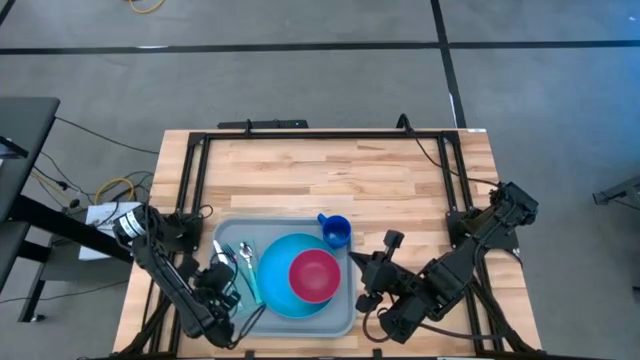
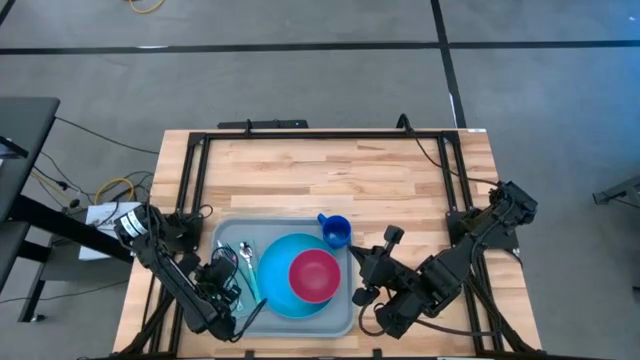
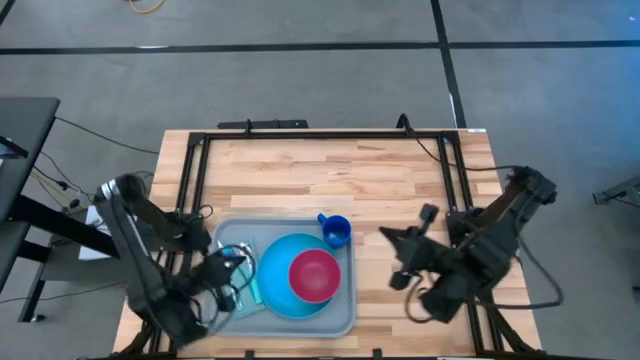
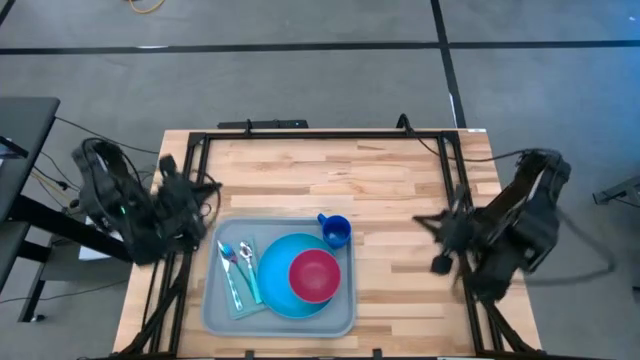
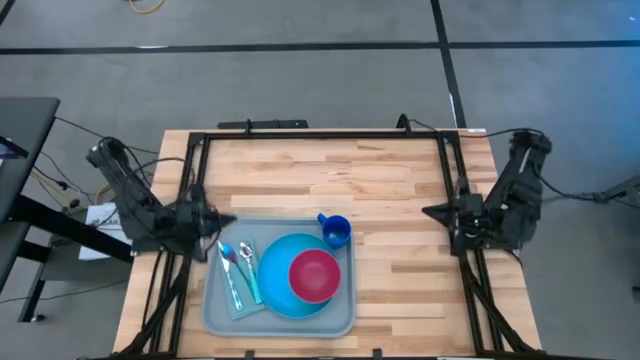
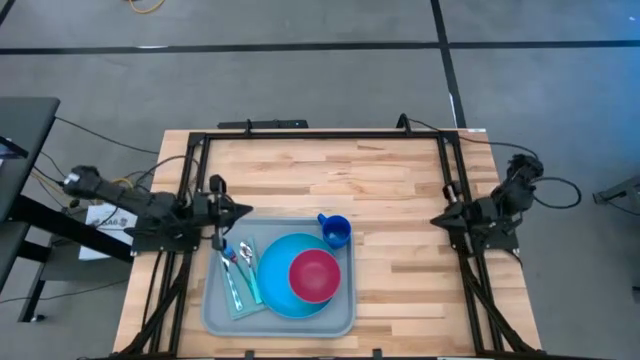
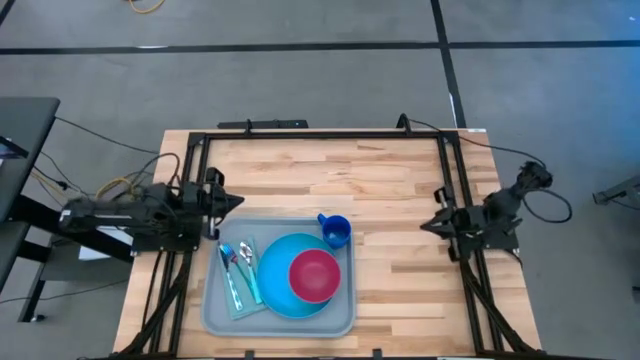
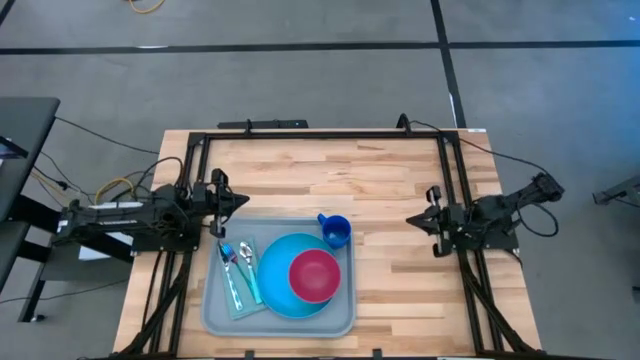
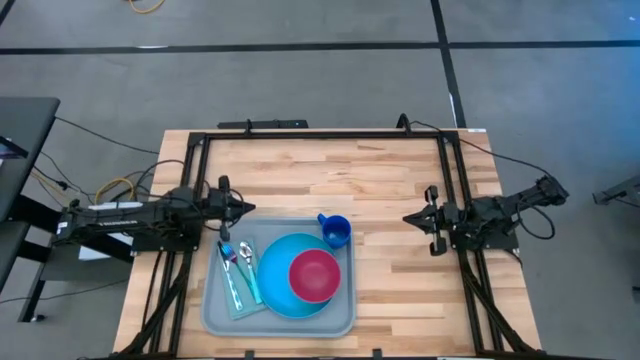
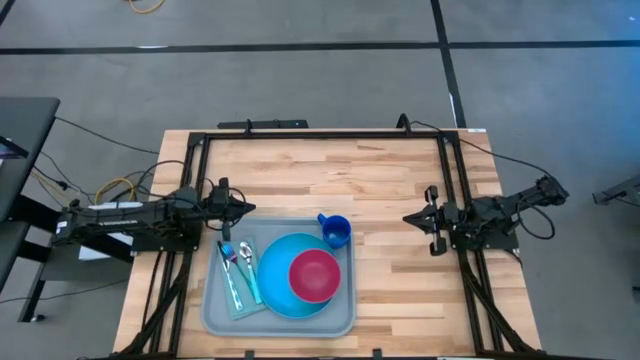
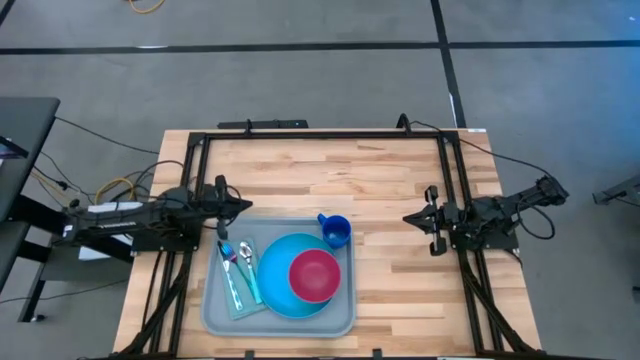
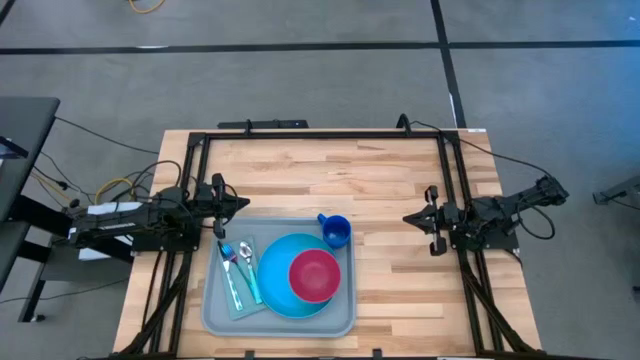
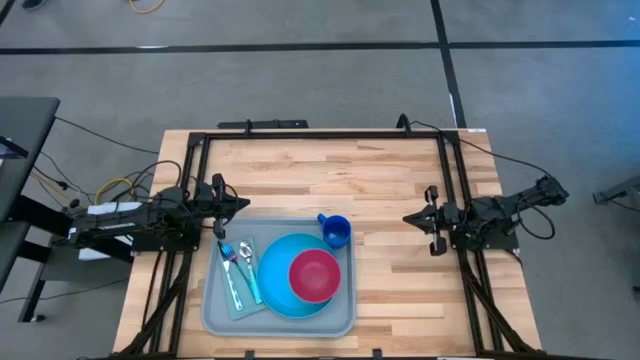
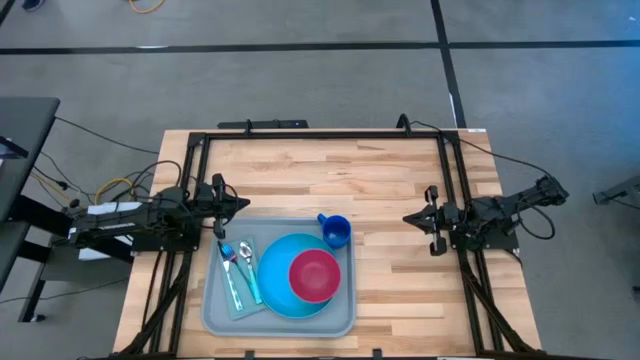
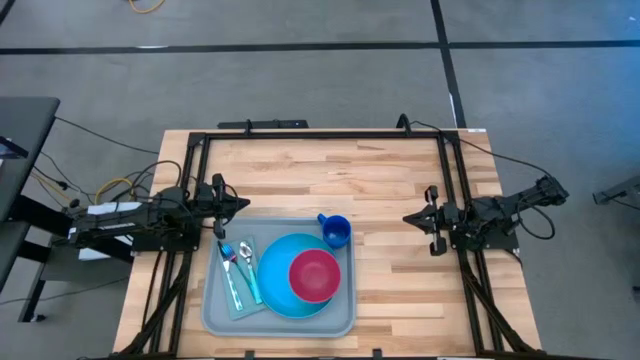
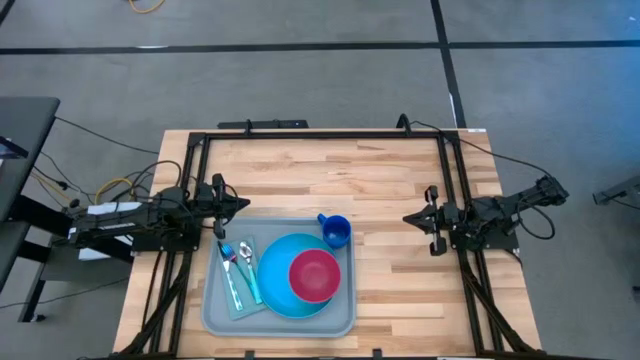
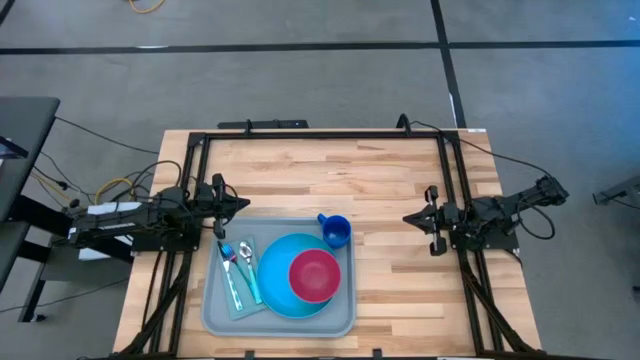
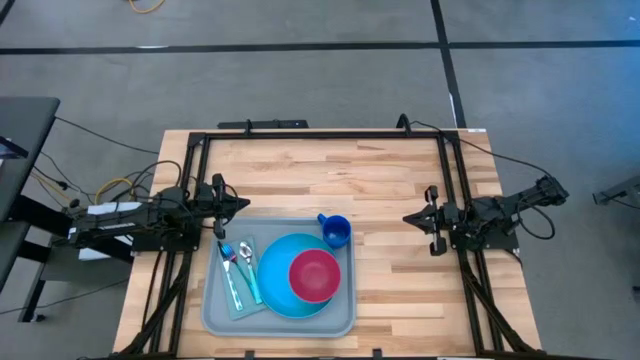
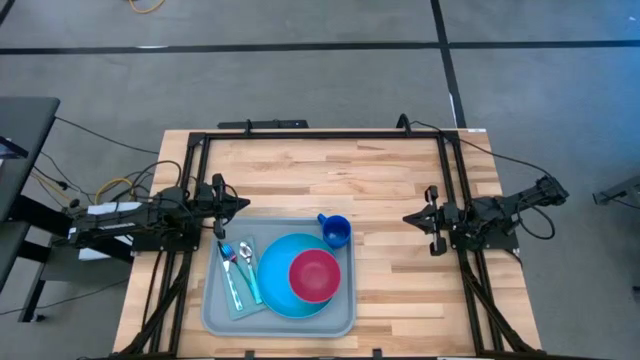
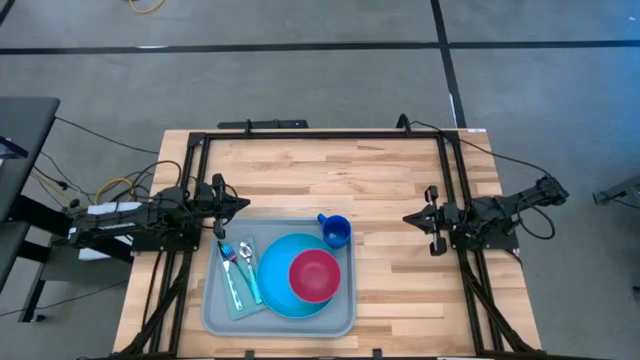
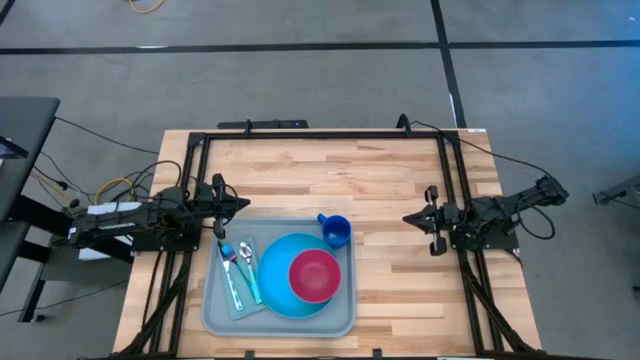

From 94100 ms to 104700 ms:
Task: Set up tray
Return to Home Position

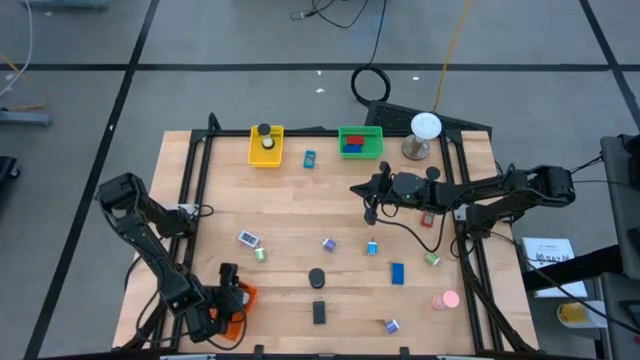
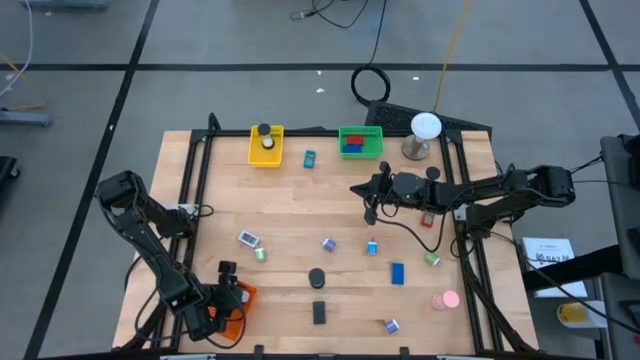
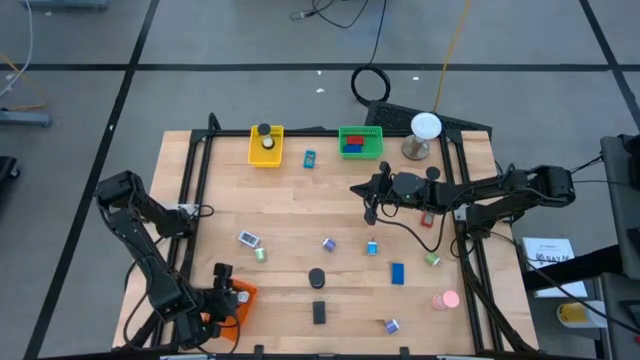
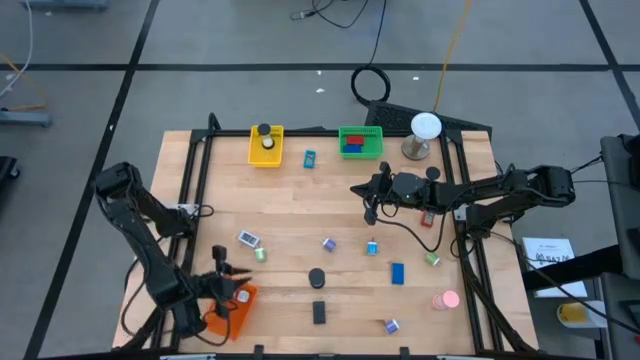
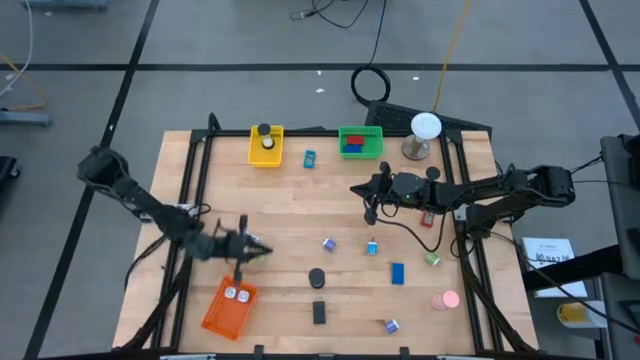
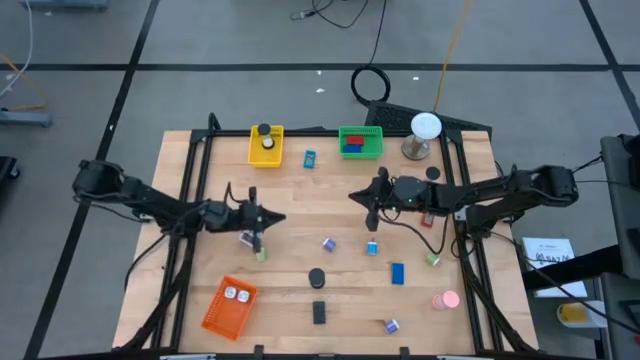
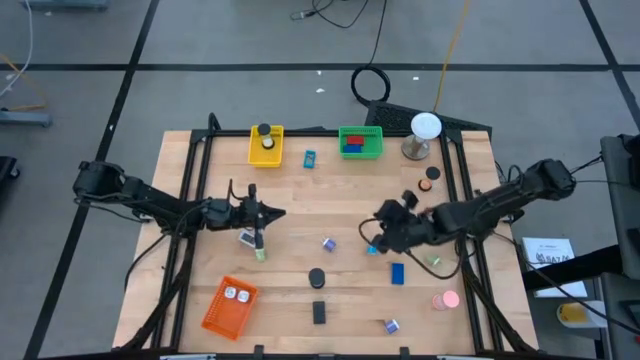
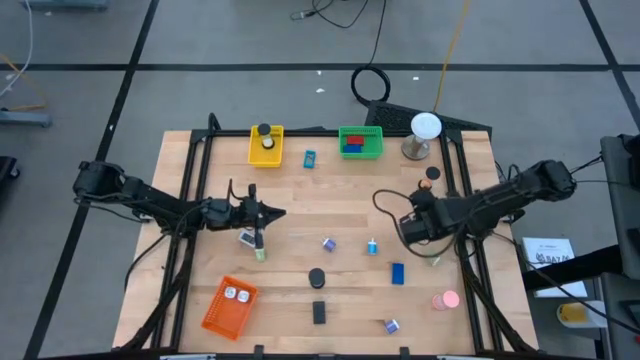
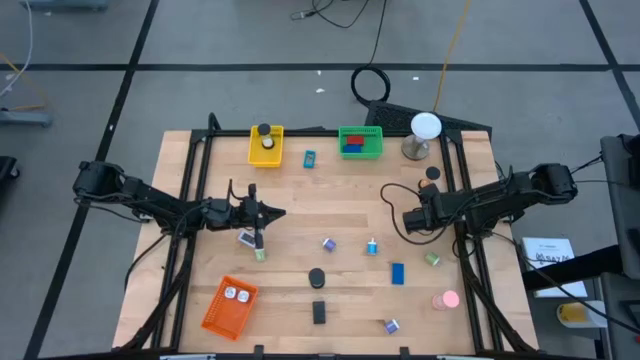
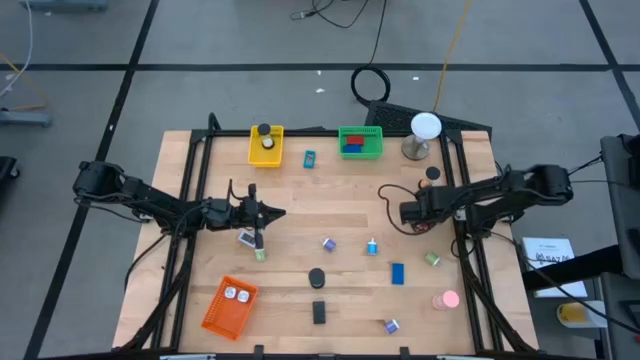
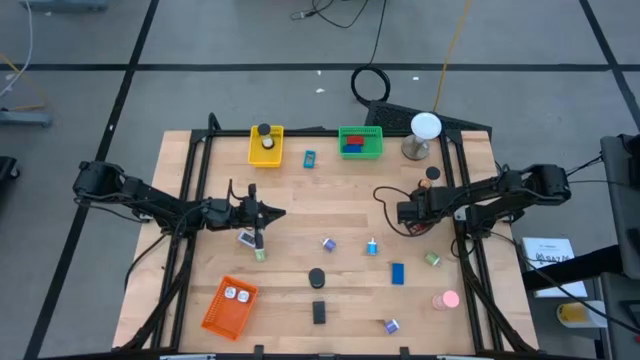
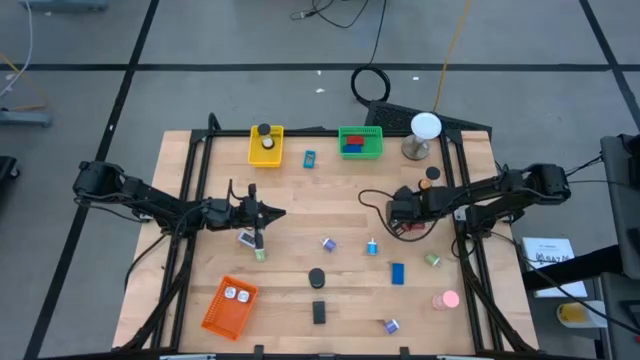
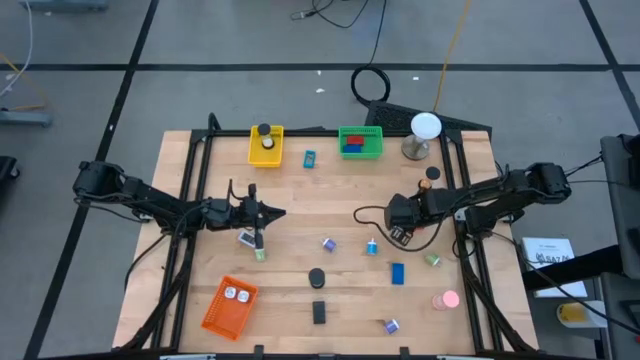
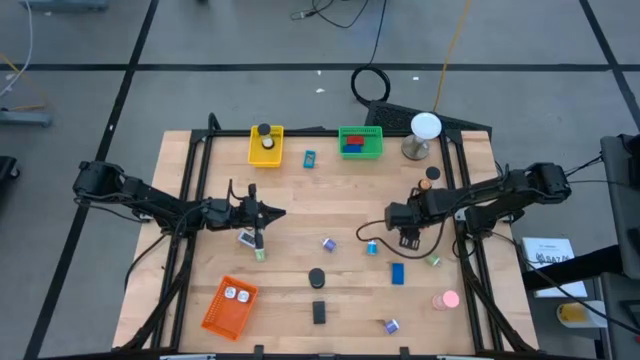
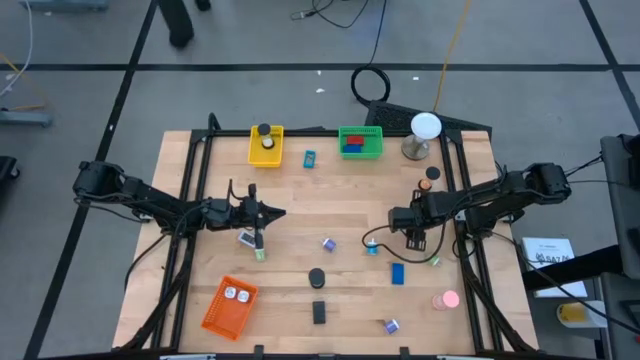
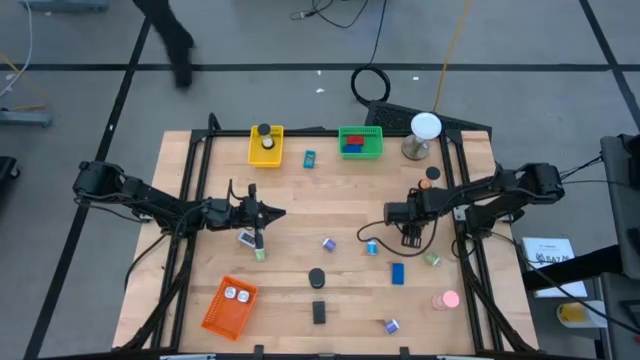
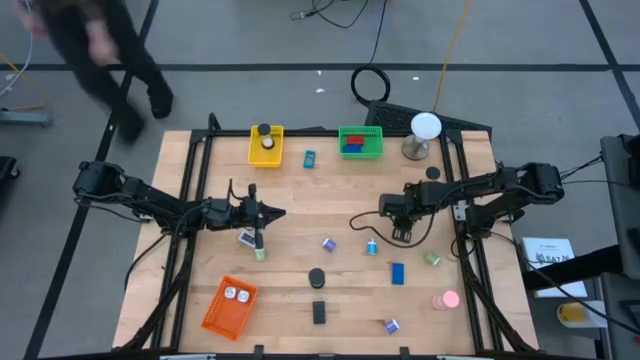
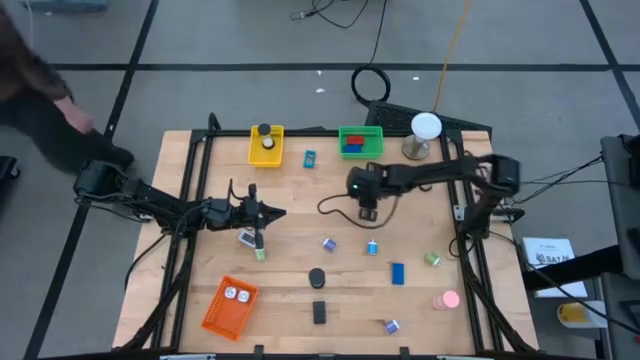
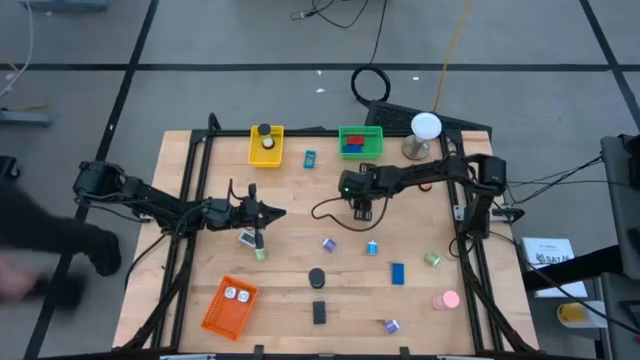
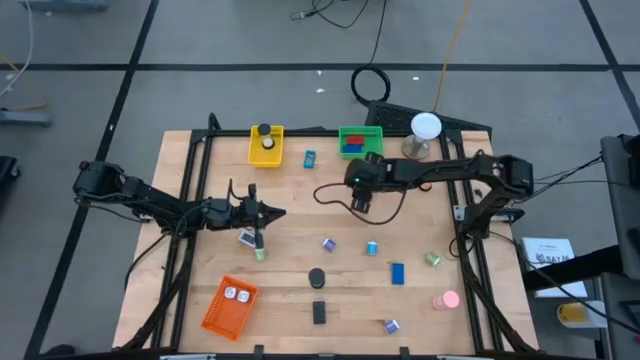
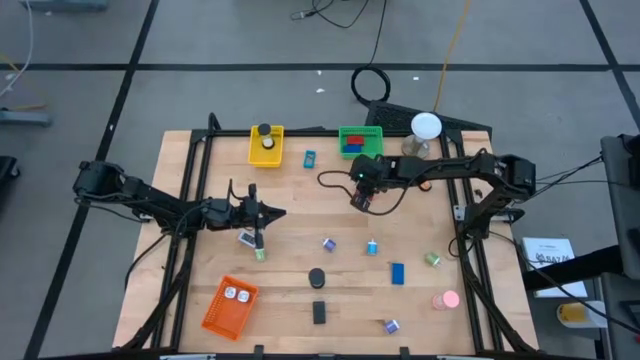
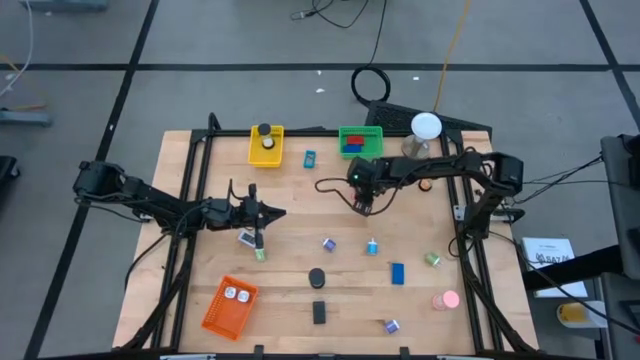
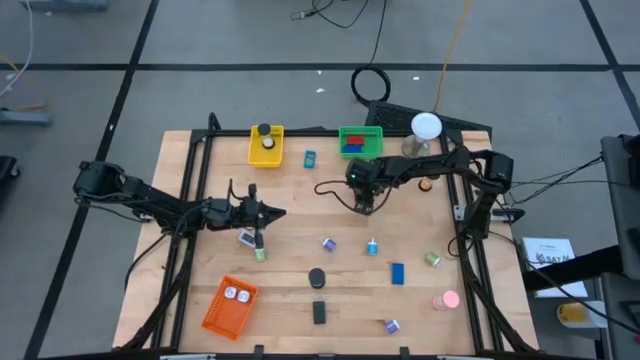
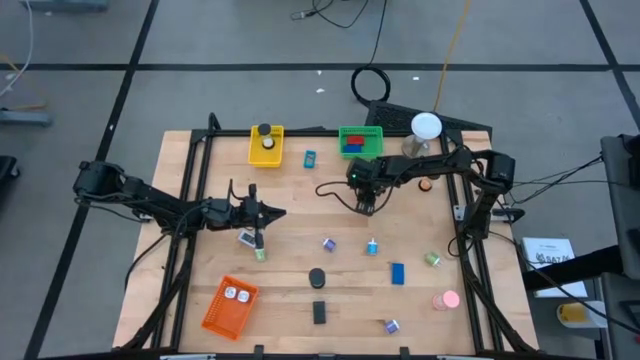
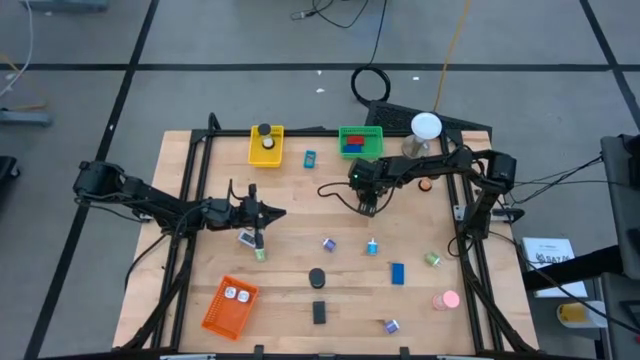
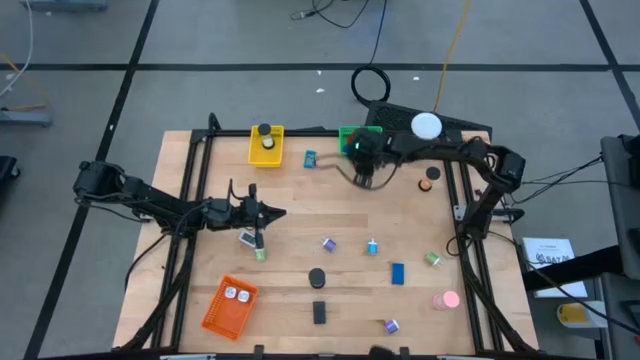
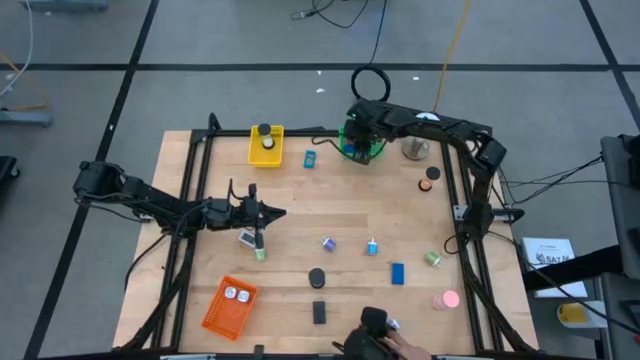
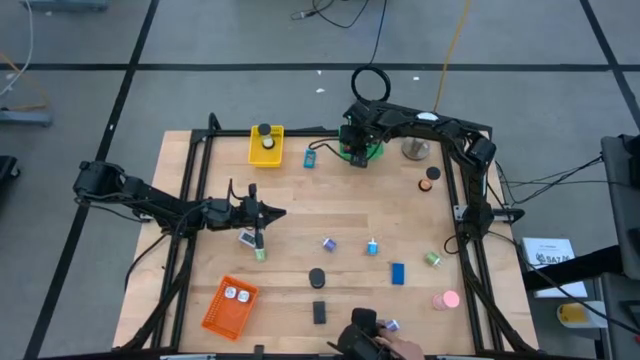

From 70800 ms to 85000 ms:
Task: Pick & Place Office items
Put the red digital clock into the green bin
